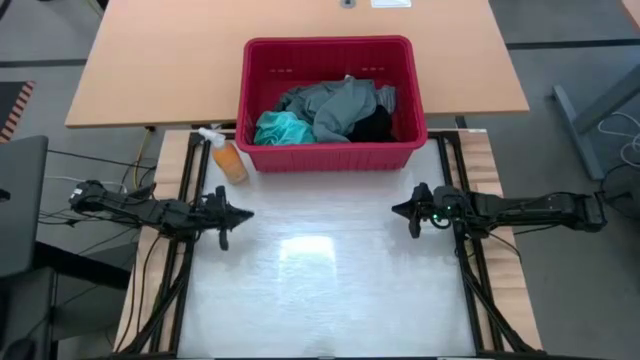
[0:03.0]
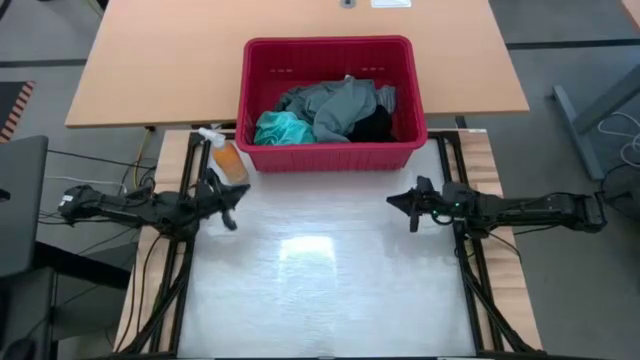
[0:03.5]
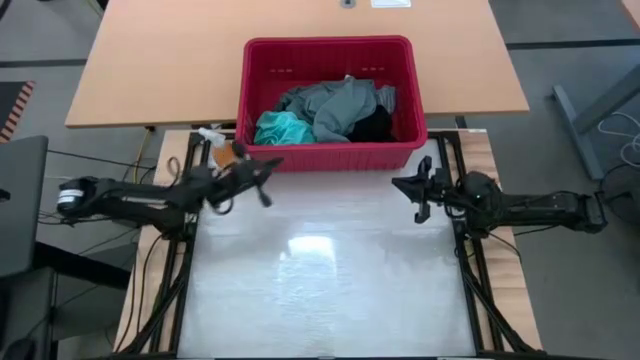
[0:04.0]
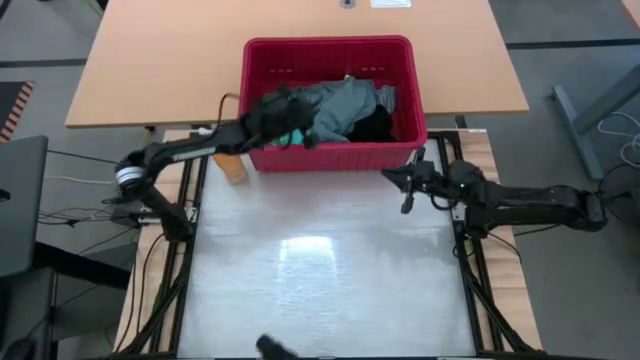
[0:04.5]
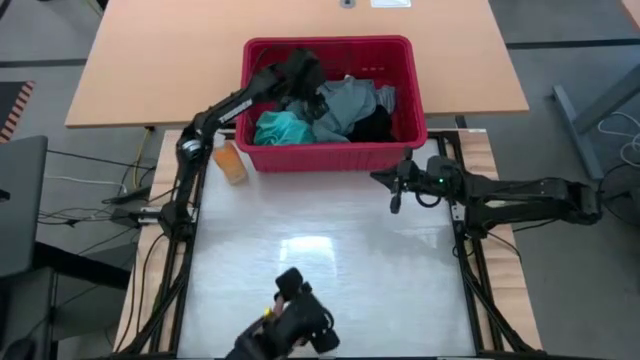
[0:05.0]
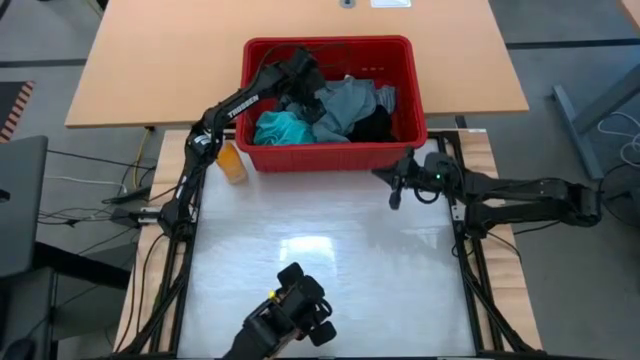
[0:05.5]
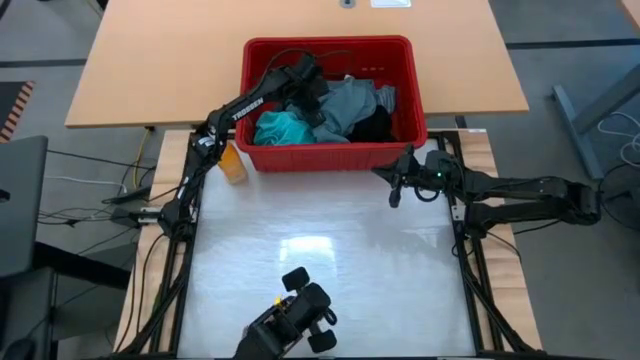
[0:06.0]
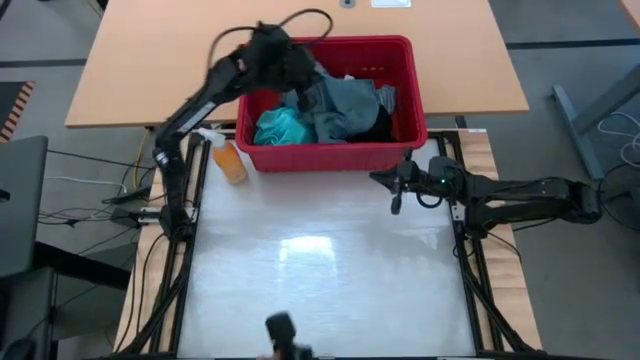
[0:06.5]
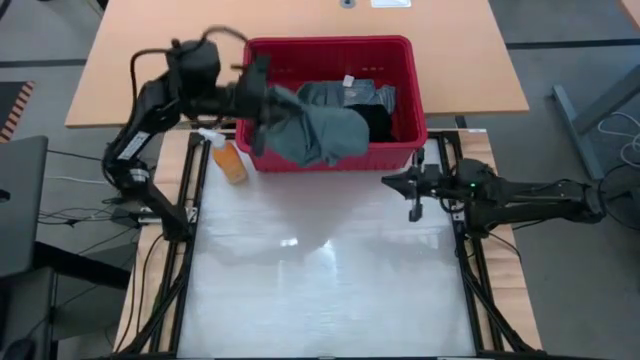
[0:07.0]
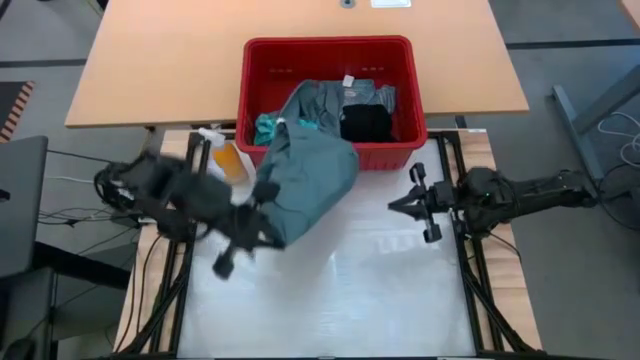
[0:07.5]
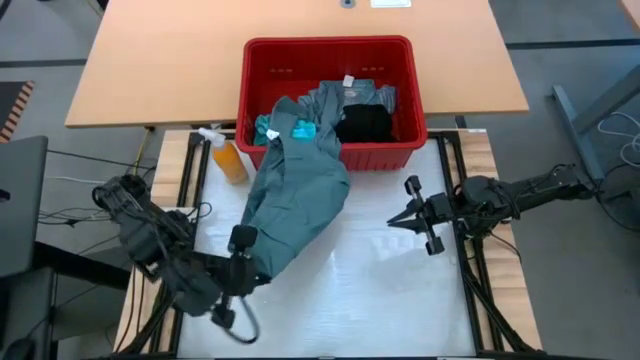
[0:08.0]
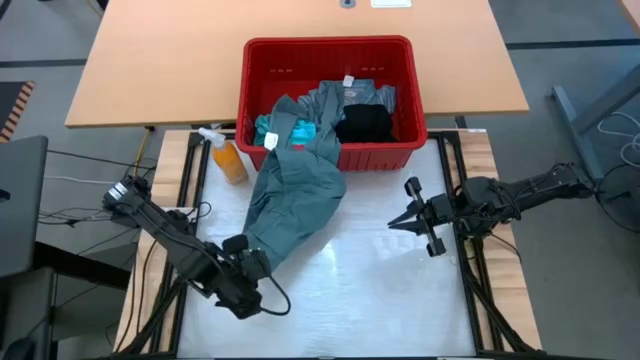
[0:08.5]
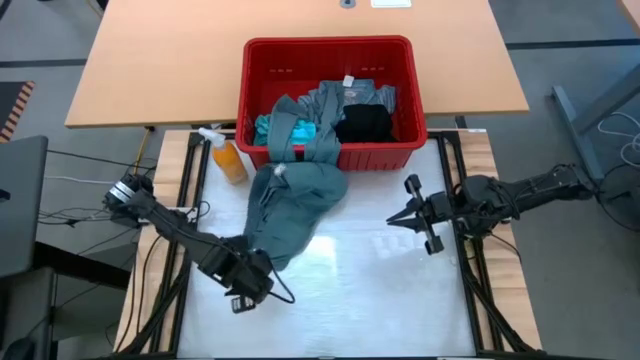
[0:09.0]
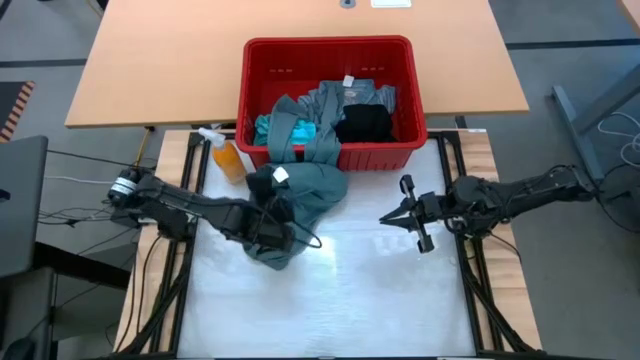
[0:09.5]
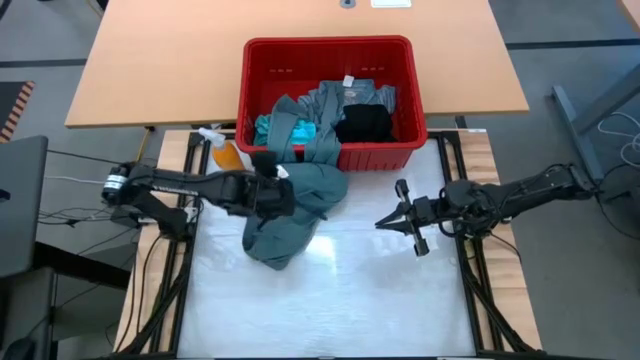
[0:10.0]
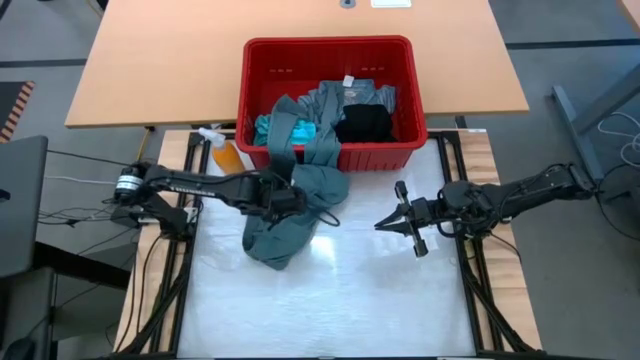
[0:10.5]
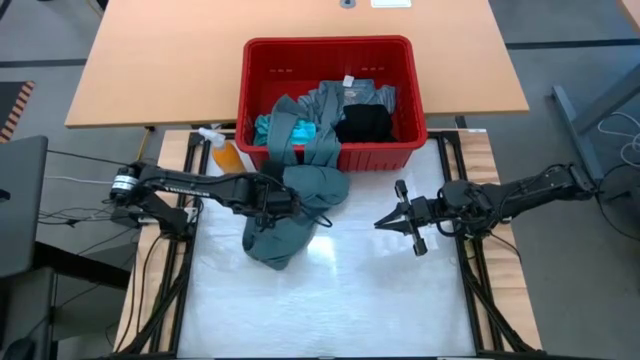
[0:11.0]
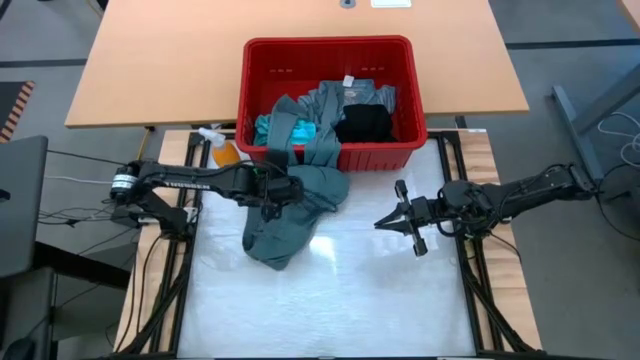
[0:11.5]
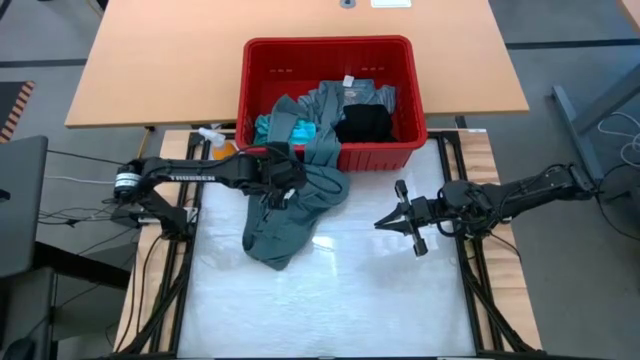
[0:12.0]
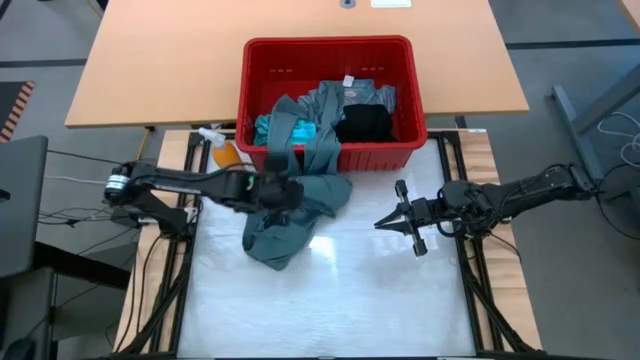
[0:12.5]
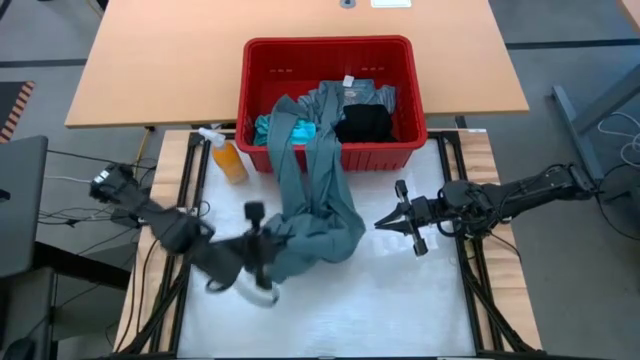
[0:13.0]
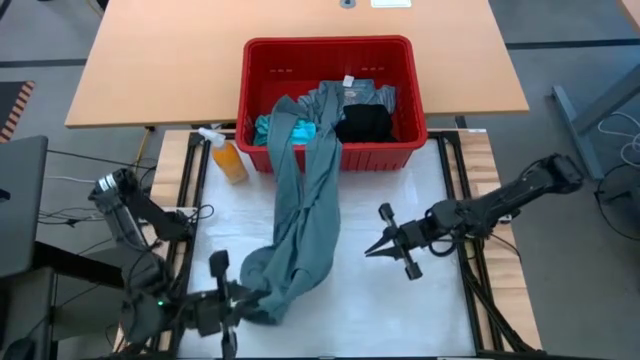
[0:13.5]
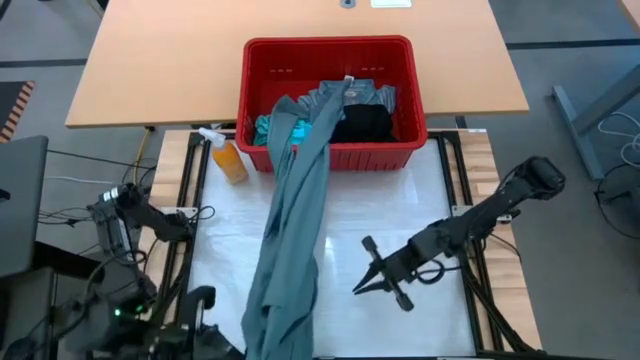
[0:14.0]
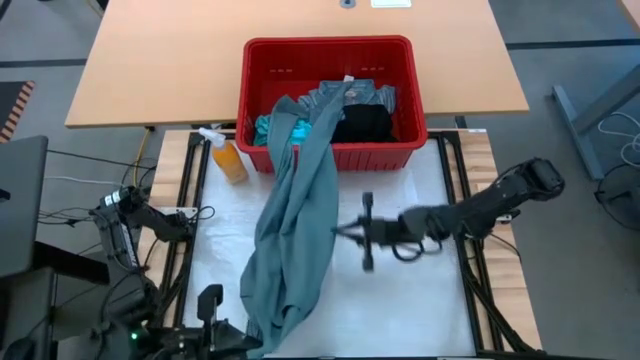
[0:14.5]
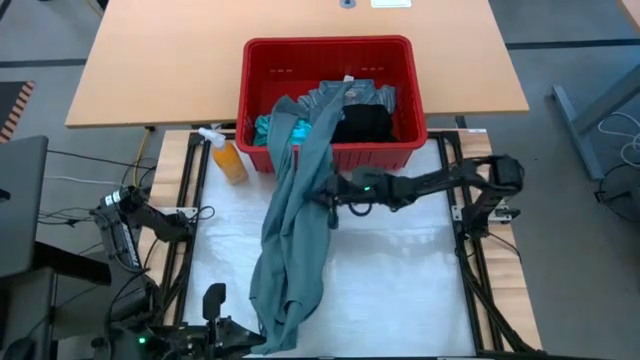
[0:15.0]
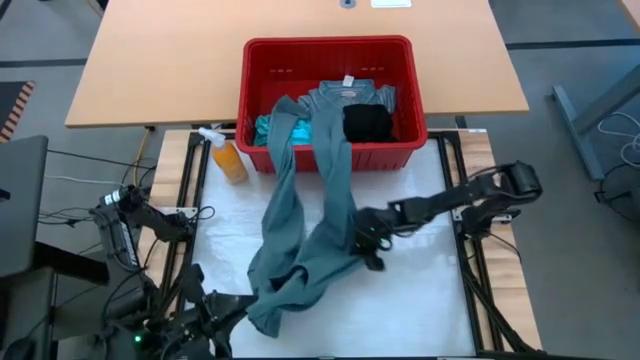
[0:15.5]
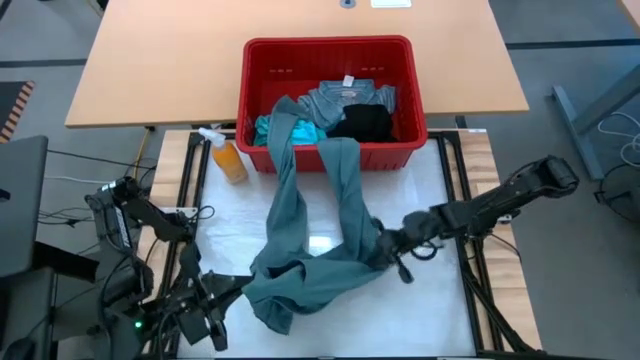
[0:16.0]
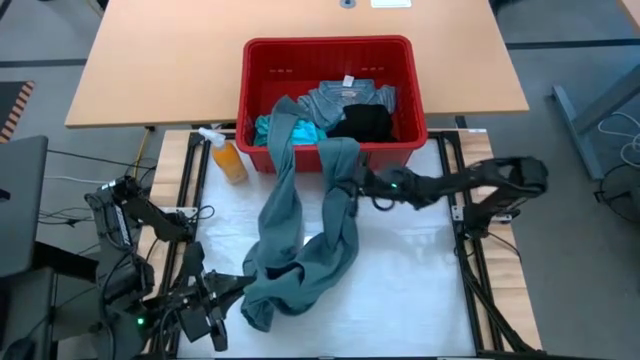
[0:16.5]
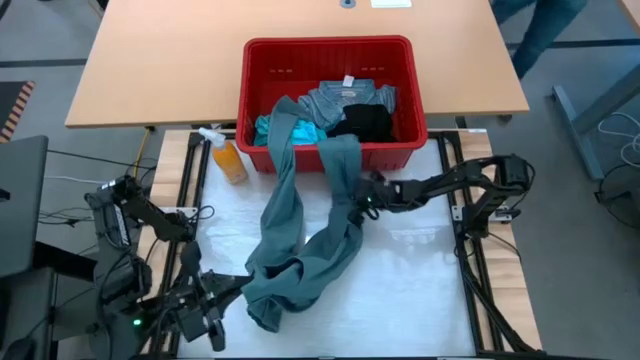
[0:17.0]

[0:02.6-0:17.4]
Task: Fold Laundry from Bin
Remove the gray pants from the red bin on the table

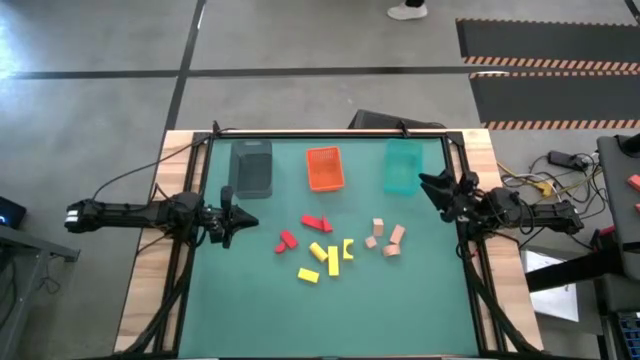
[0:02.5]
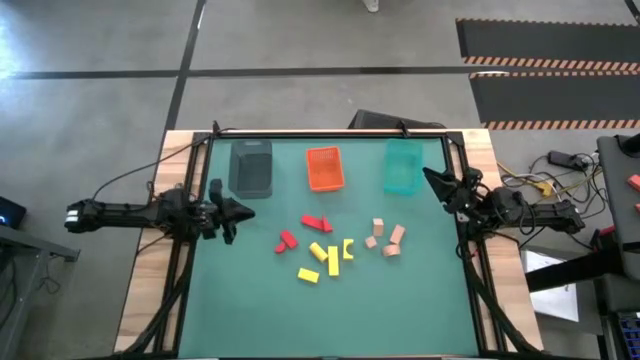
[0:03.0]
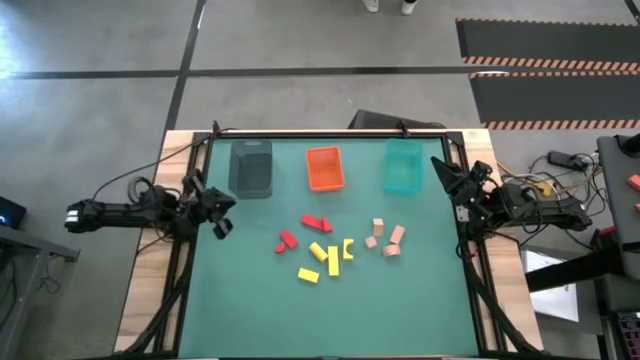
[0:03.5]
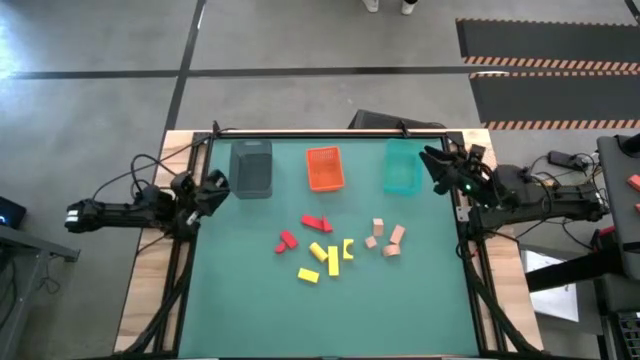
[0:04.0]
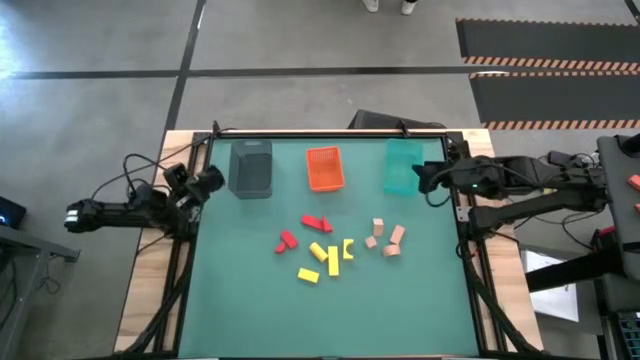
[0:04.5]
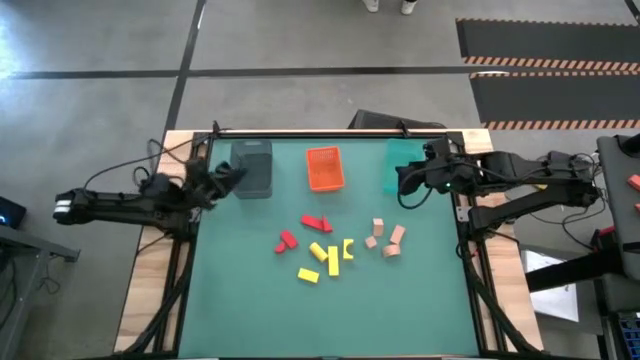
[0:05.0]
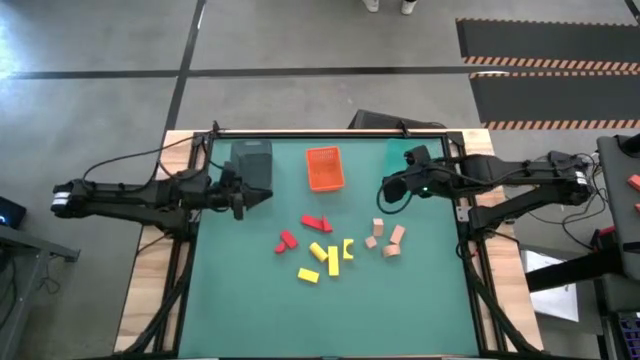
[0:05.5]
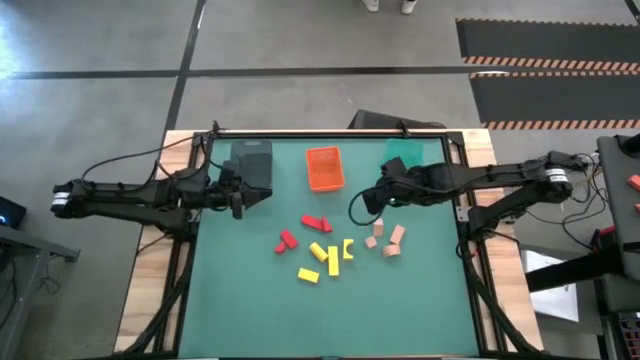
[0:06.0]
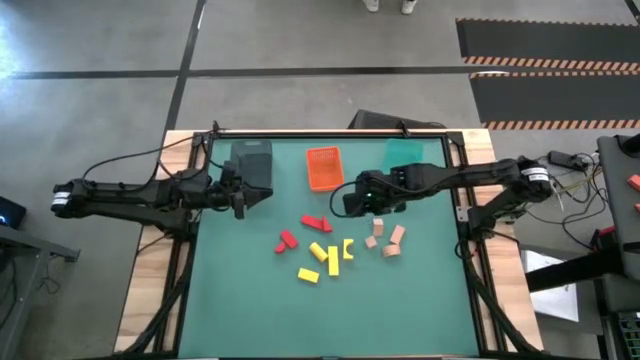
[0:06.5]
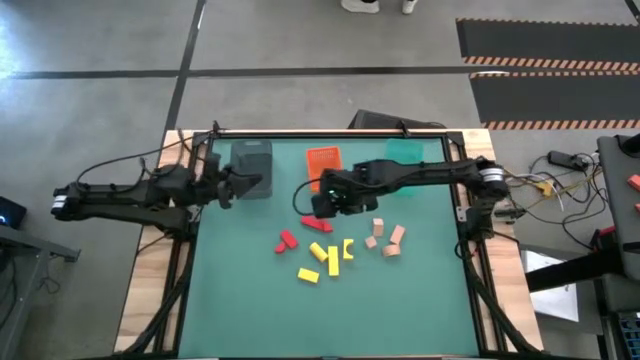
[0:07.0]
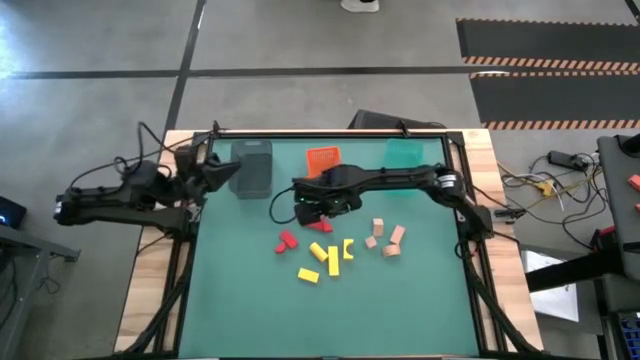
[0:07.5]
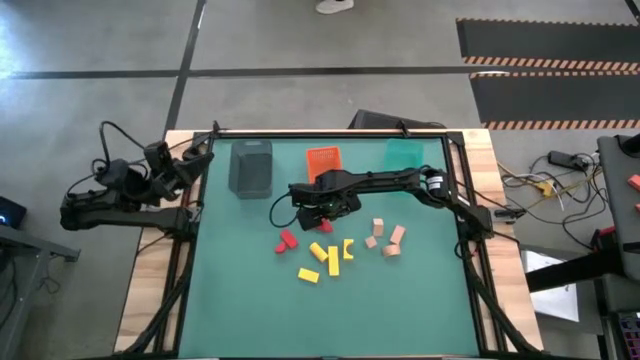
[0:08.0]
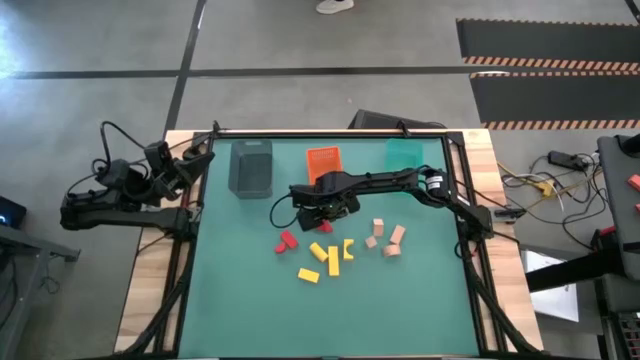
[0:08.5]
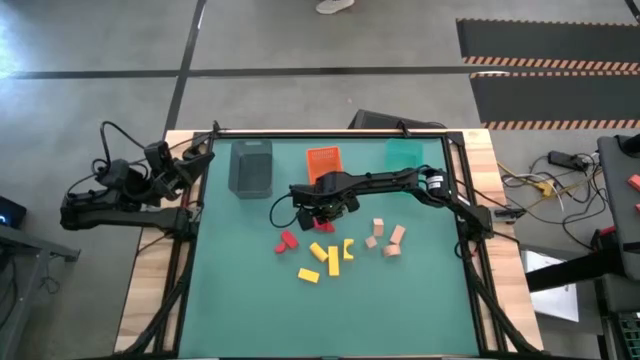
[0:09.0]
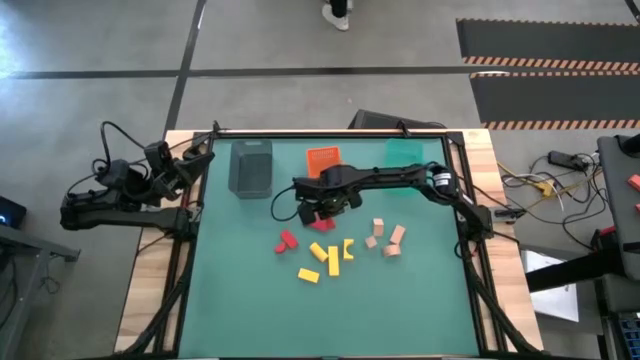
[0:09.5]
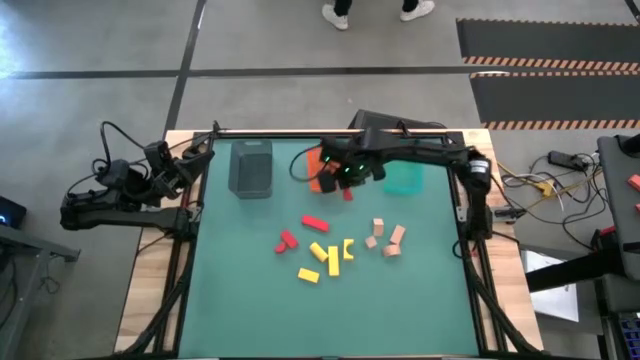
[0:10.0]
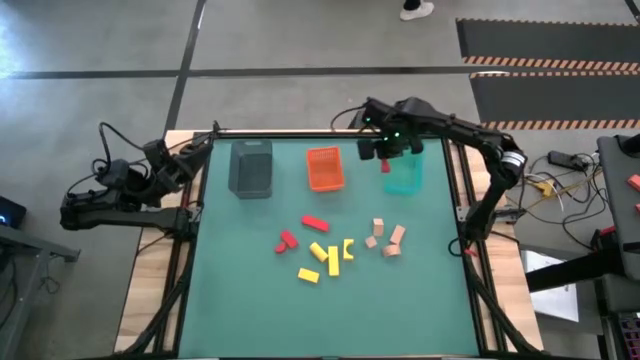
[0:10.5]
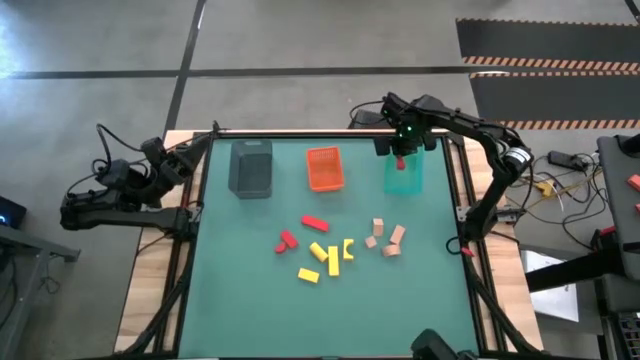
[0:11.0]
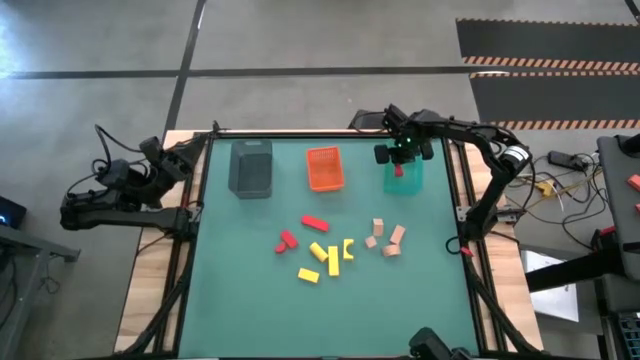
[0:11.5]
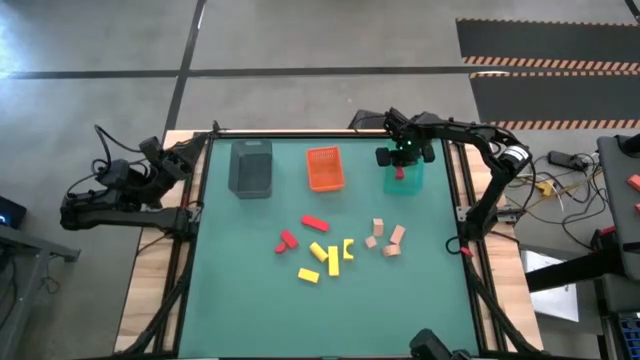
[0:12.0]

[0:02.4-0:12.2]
Task: Sort & place blocks by color
Put the red block into the green bin
